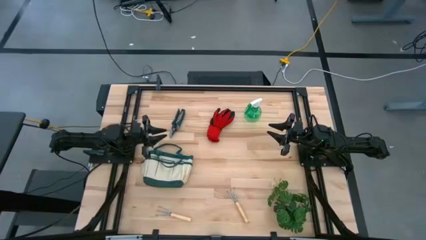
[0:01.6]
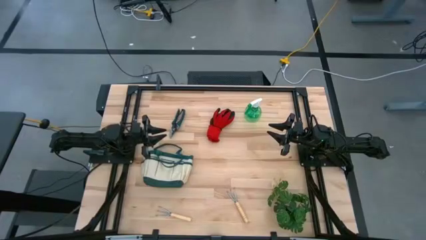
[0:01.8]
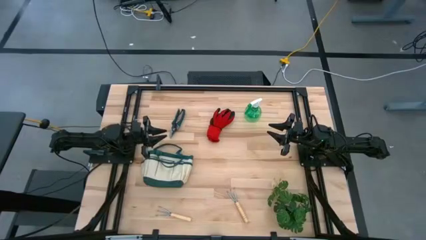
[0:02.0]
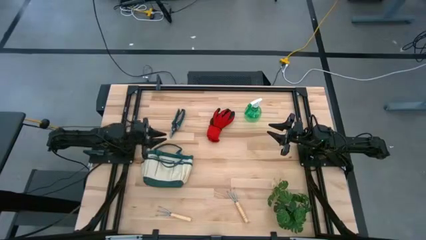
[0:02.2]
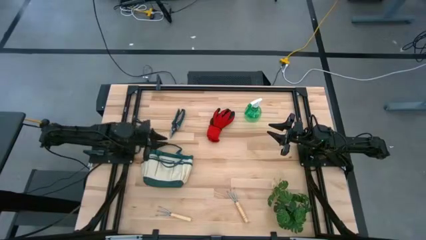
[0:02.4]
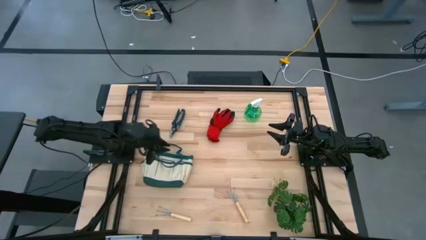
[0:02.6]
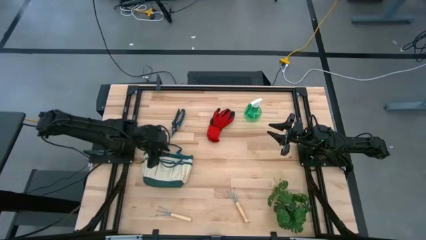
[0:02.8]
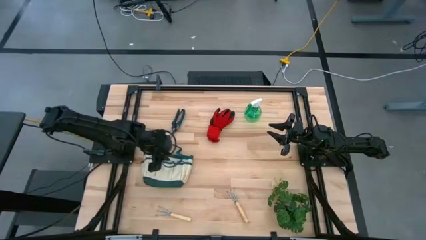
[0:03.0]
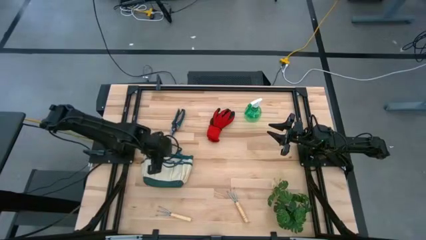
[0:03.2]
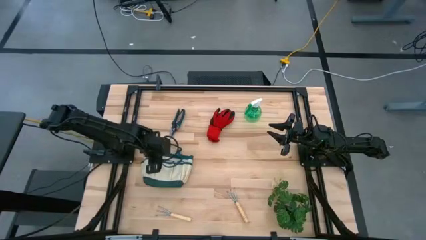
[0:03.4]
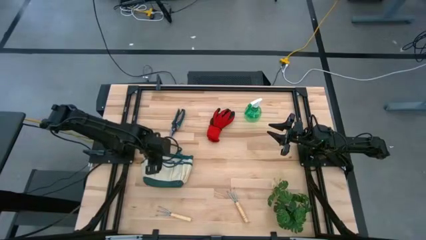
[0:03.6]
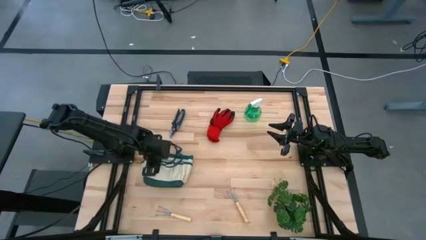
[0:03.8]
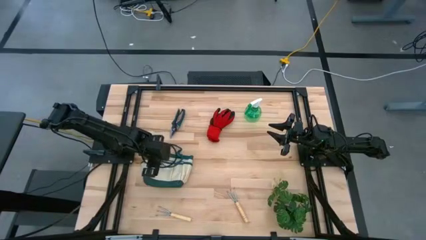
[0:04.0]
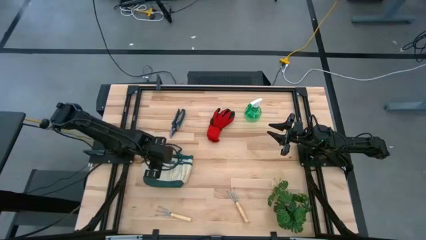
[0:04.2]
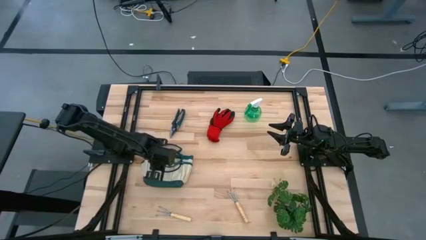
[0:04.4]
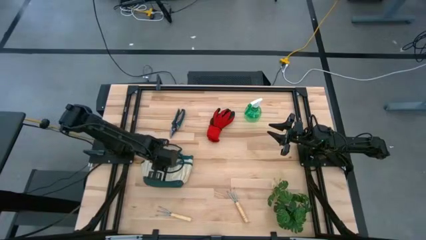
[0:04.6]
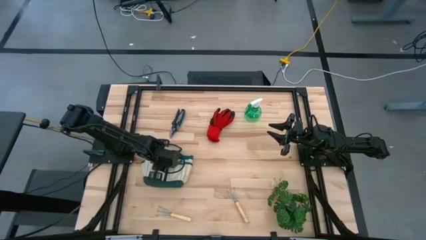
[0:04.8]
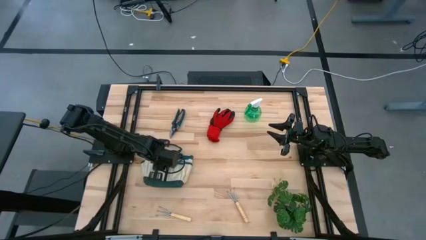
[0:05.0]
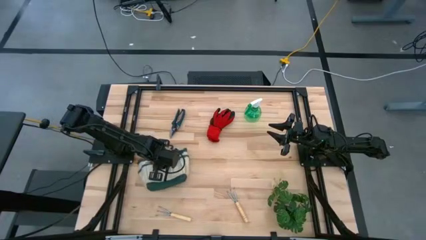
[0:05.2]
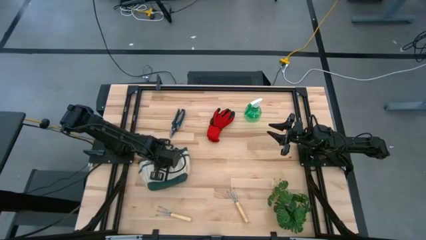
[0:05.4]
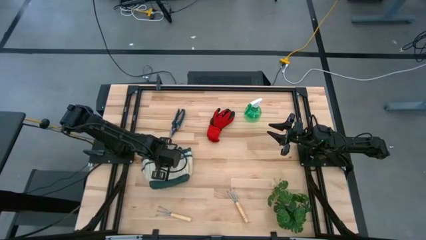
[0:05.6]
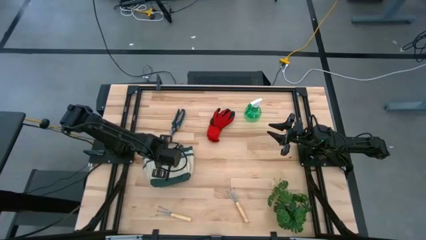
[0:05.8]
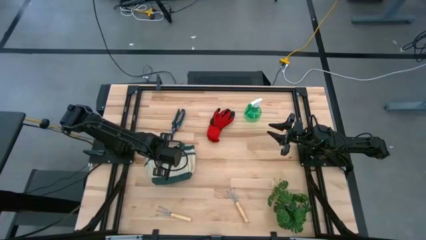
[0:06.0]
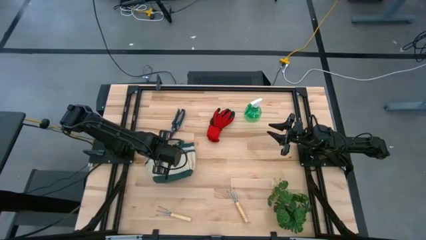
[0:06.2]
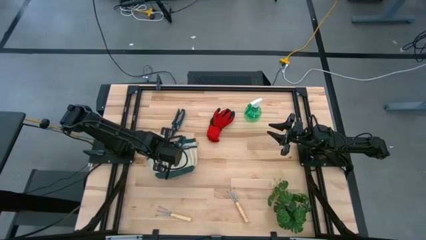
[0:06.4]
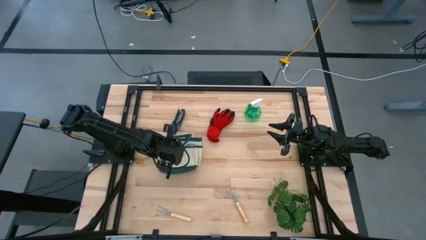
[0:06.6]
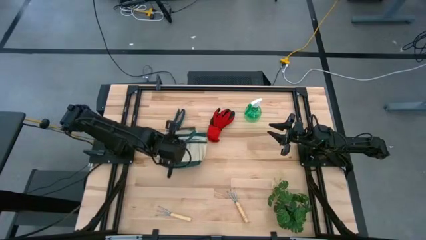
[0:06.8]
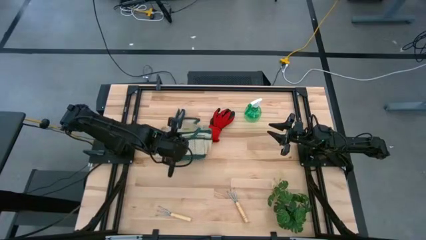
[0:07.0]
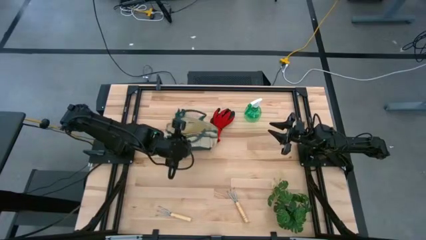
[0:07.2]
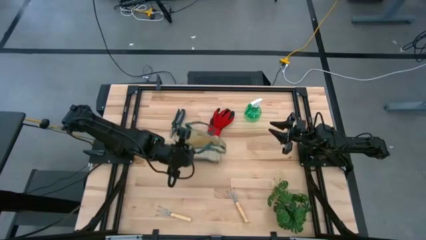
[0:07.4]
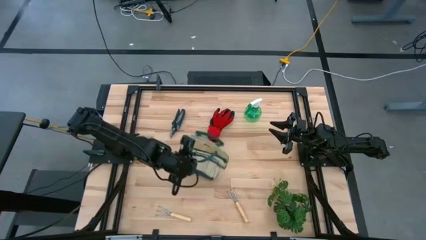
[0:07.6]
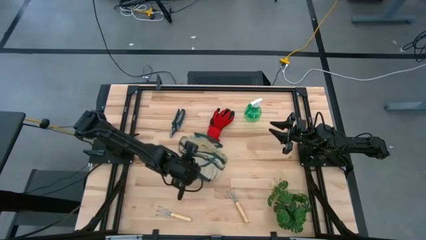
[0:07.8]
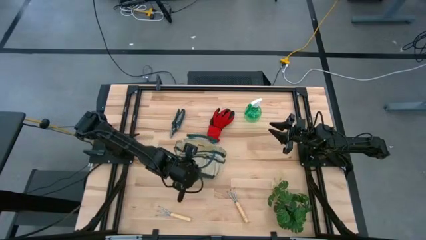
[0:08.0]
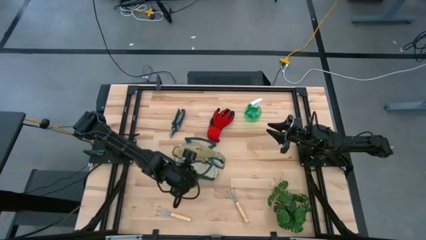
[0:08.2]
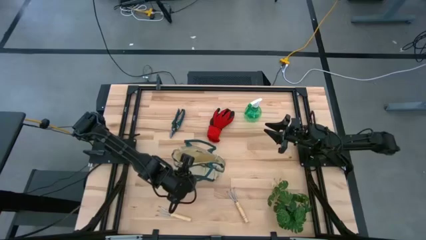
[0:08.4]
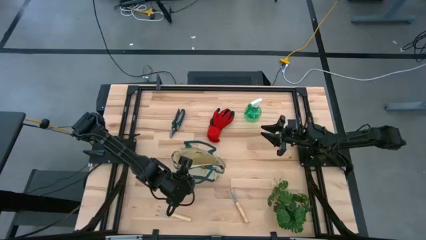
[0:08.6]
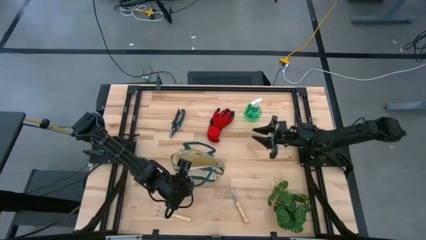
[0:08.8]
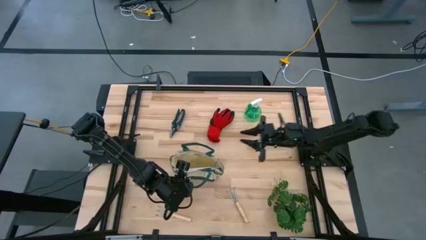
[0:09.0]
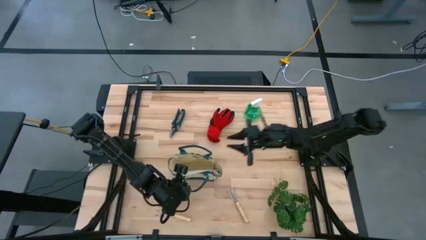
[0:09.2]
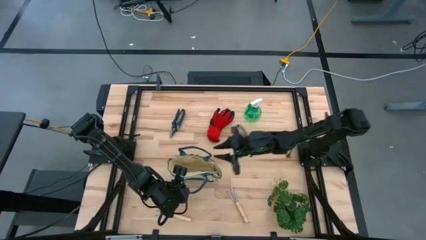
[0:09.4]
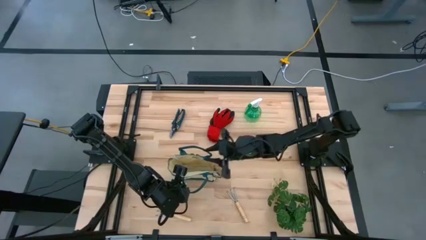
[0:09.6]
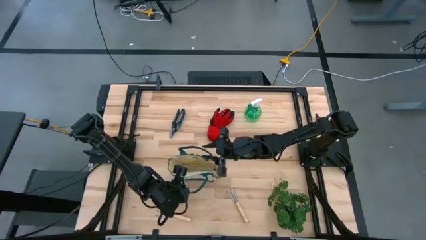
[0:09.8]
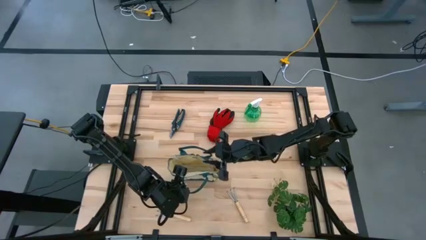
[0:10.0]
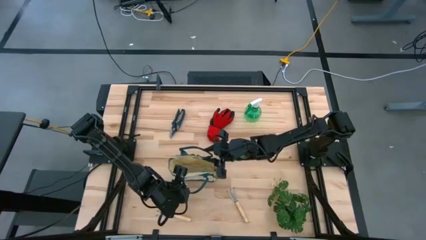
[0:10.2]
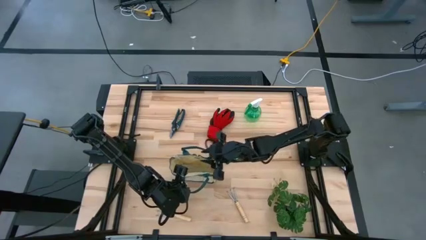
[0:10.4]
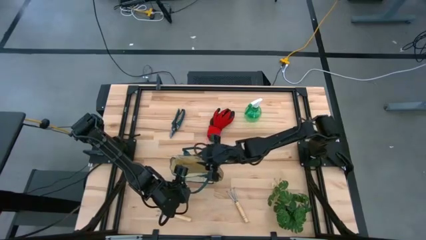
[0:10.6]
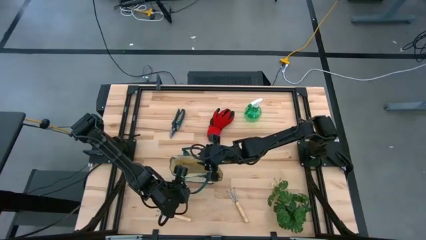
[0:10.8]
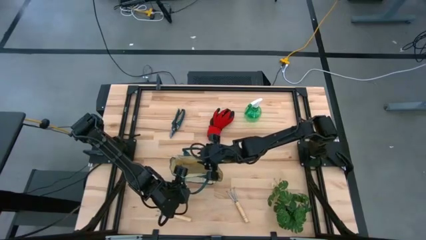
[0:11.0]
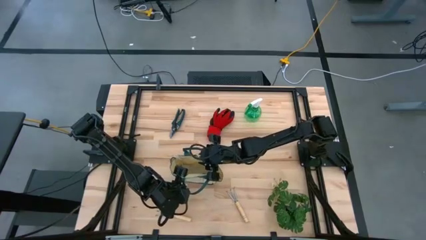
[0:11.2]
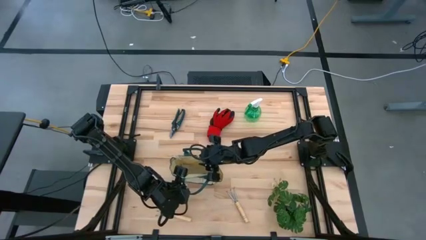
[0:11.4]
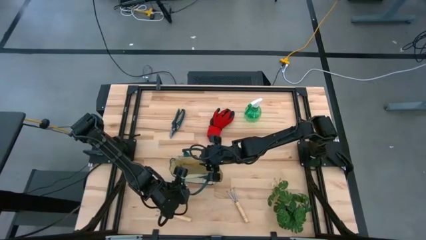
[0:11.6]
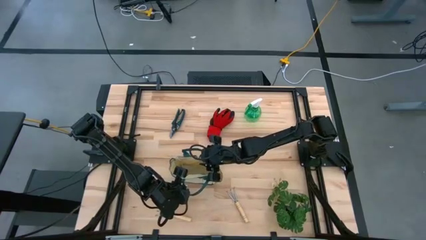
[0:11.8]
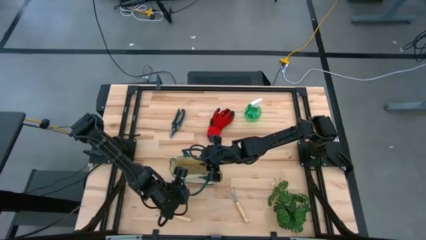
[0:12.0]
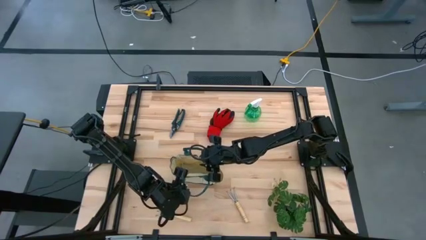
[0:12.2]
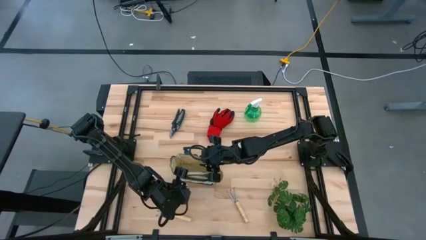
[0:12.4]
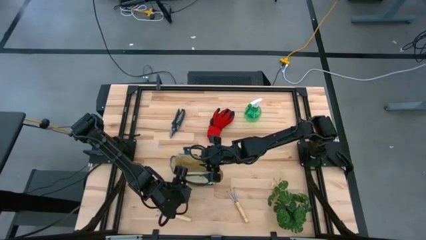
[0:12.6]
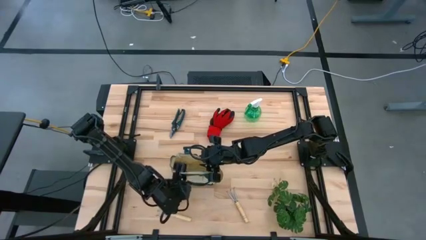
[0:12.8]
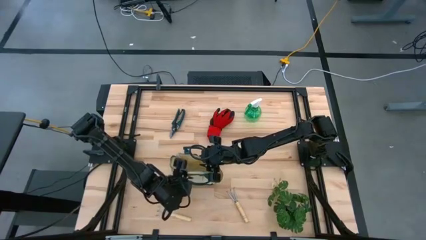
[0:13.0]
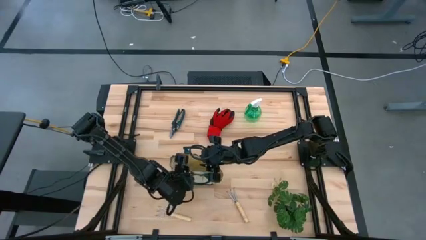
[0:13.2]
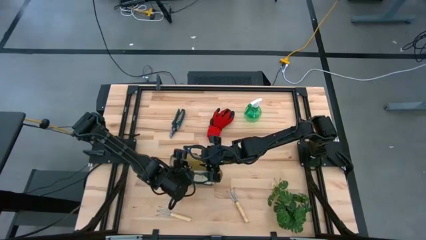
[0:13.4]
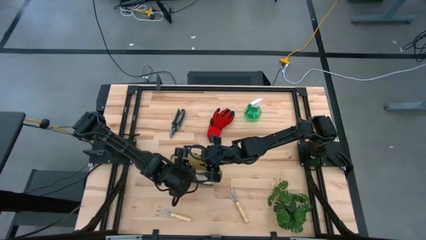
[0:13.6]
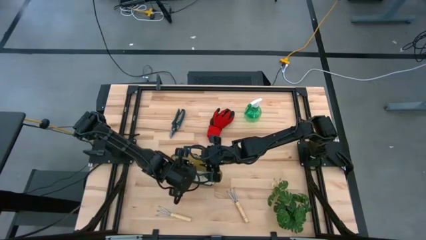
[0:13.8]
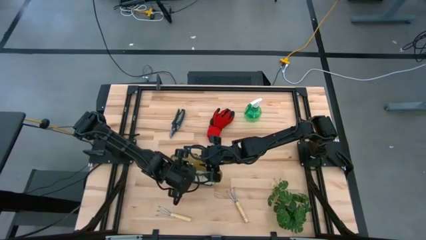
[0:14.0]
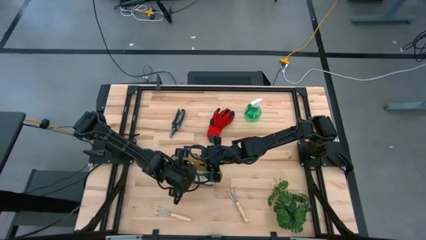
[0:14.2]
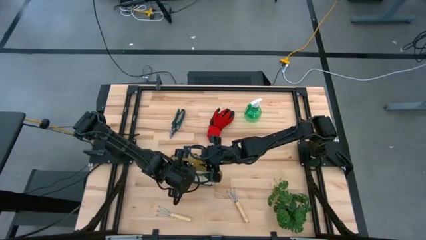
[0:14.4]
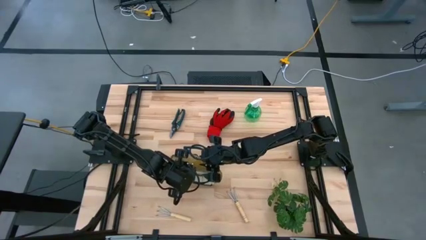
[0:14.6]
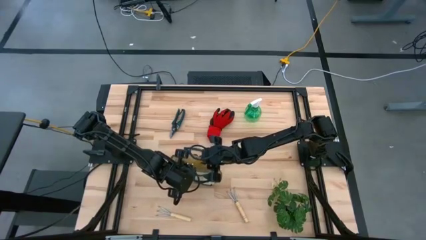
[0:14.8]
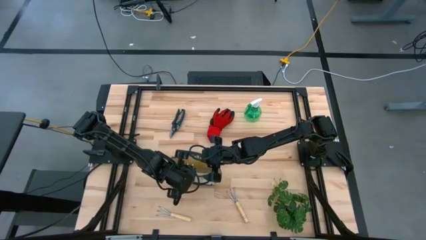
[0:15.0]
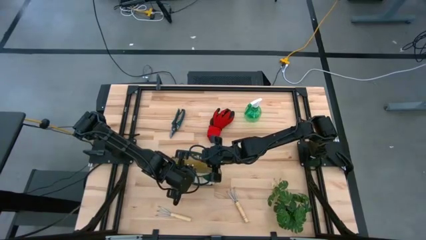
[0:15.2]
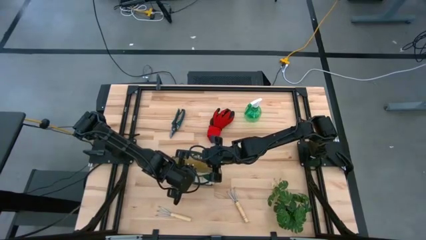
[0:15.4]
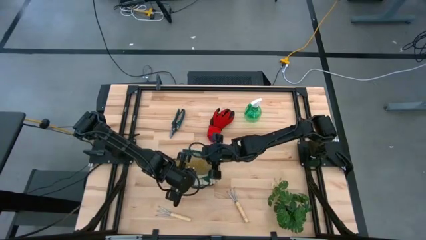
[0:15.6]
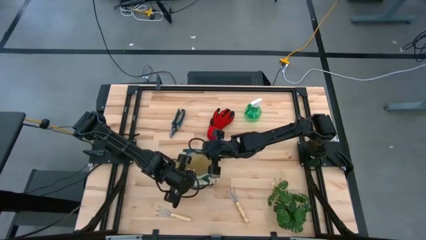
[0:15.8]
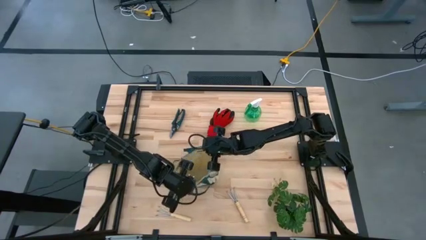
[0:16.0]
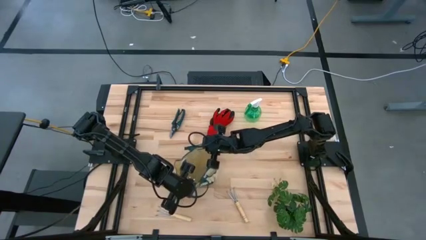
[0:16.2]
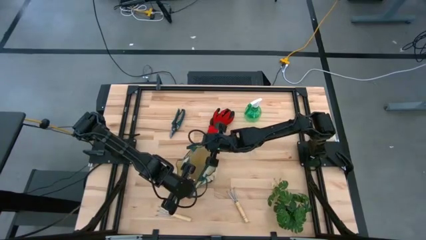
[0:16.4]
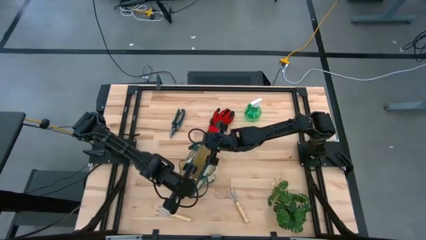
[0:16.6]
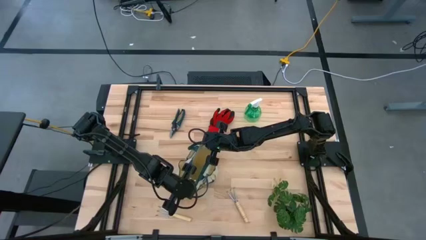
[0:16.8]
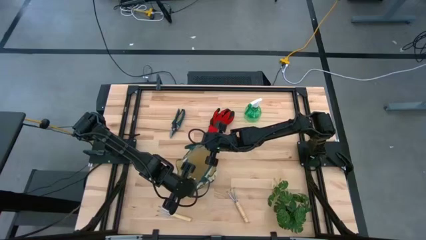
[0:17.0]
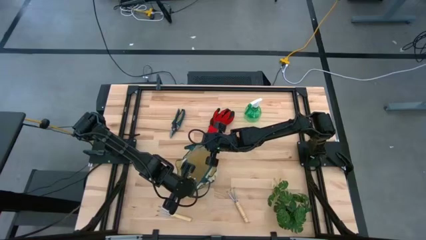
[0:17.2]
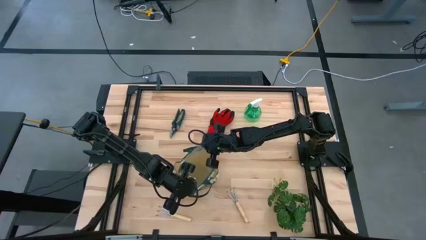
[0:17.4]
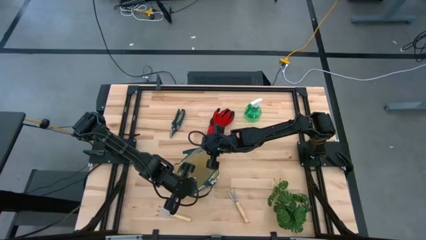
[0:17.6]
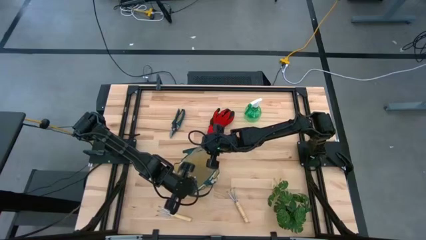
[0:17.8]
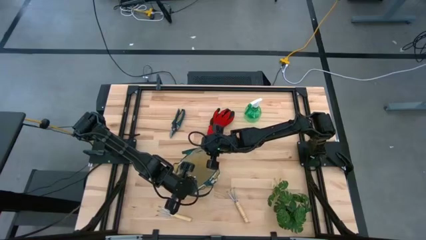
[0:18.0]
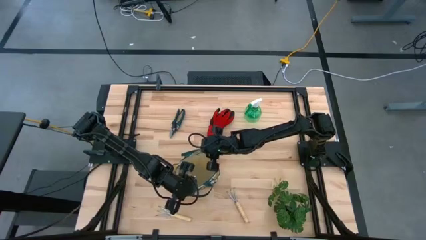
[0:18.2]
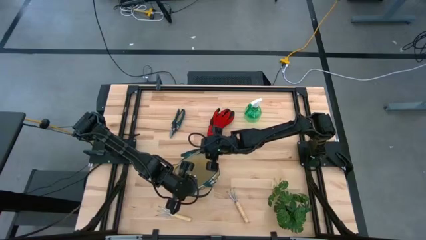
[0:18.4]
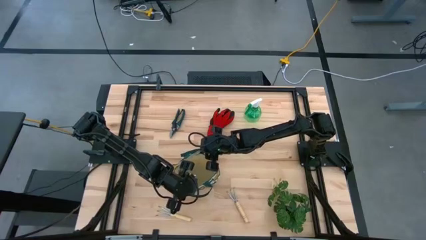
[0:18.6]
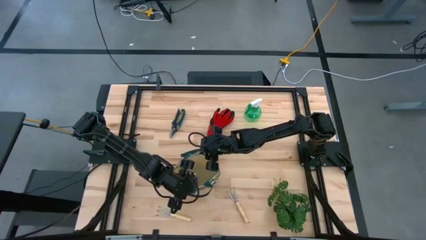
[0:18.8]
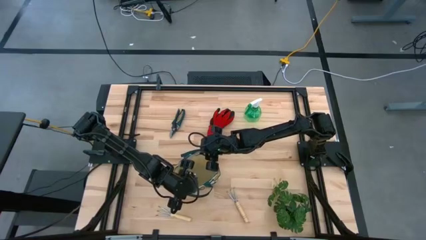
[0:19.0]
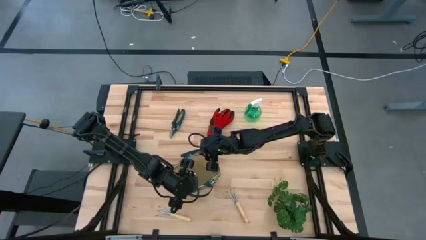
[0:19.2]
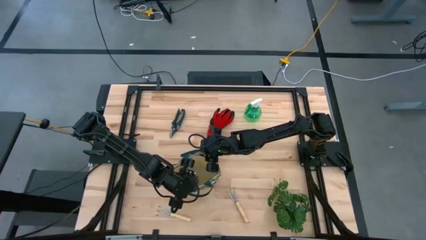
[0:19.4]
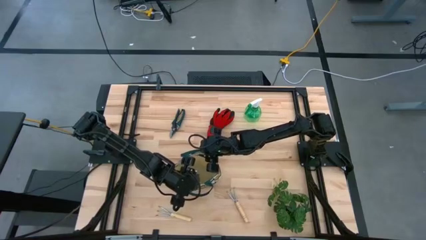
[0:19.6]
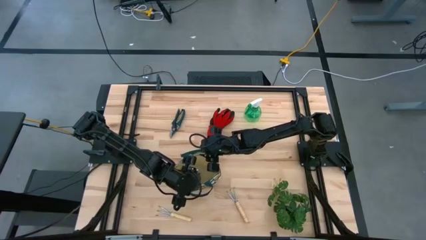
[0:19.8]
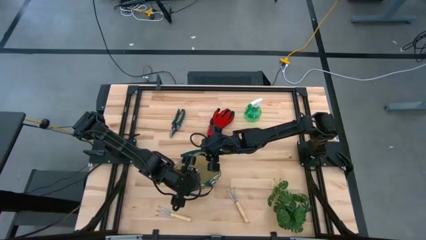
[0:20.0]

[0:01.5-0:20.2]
Task: Pick & Place Garden tools in Gardening bag
Prepare the gardening bag
